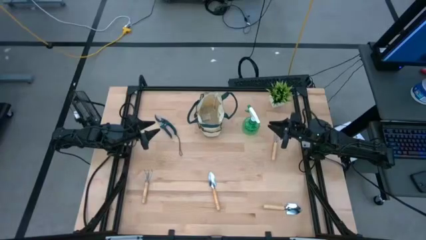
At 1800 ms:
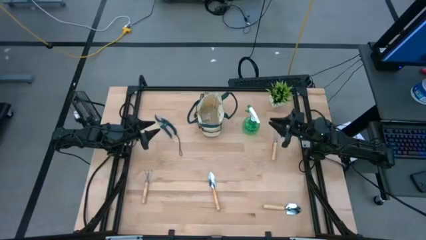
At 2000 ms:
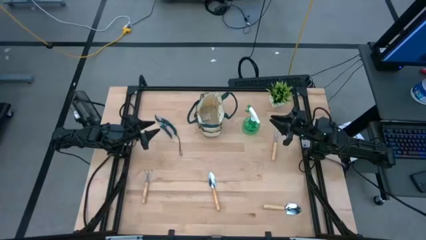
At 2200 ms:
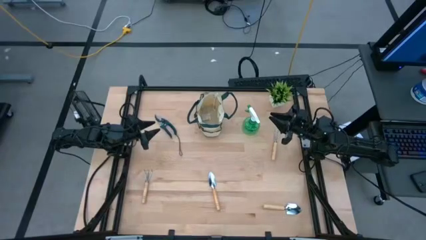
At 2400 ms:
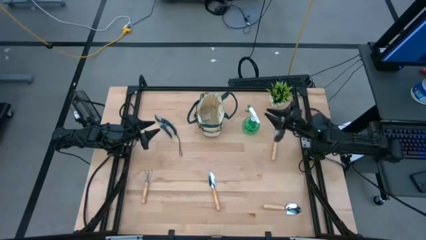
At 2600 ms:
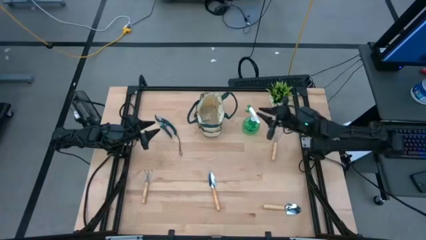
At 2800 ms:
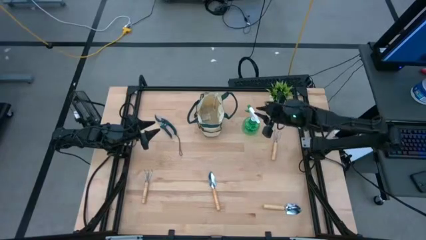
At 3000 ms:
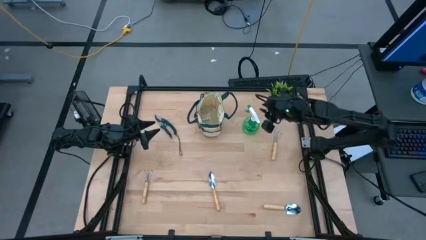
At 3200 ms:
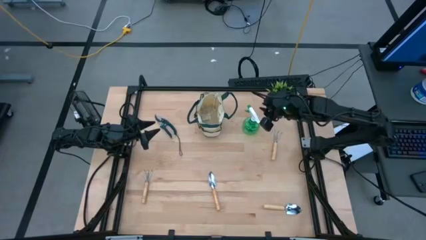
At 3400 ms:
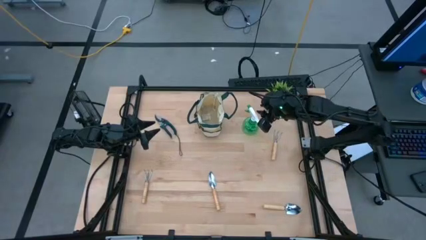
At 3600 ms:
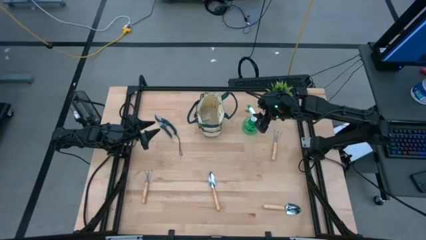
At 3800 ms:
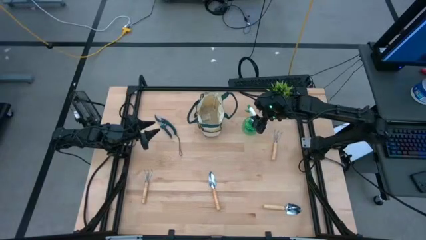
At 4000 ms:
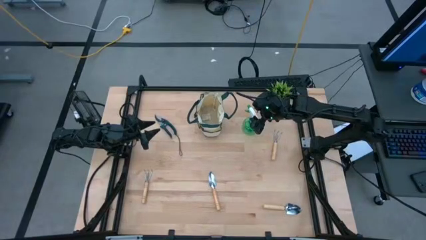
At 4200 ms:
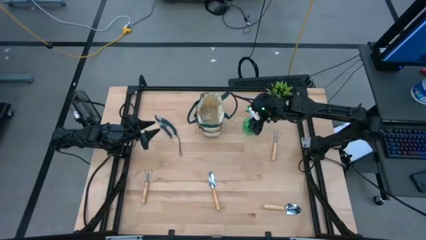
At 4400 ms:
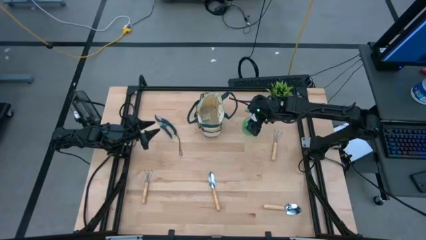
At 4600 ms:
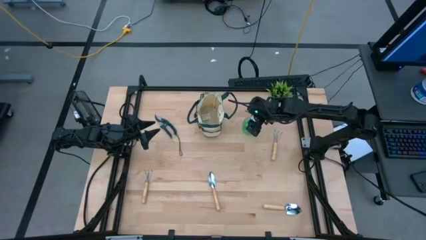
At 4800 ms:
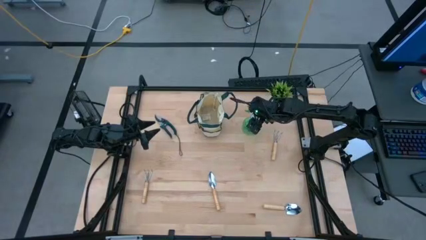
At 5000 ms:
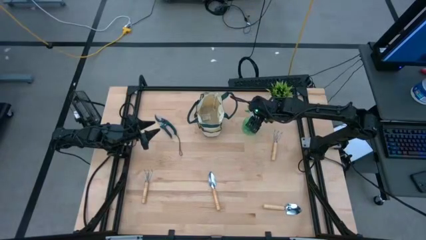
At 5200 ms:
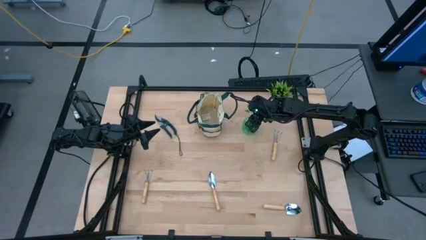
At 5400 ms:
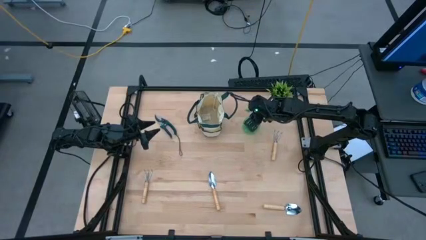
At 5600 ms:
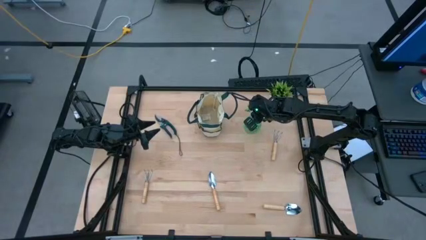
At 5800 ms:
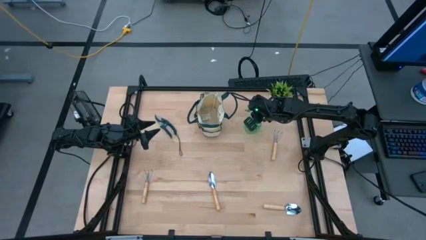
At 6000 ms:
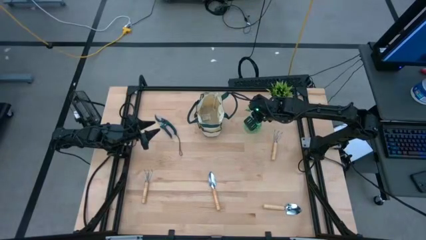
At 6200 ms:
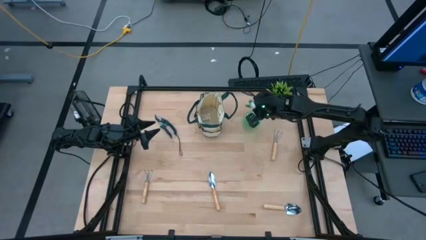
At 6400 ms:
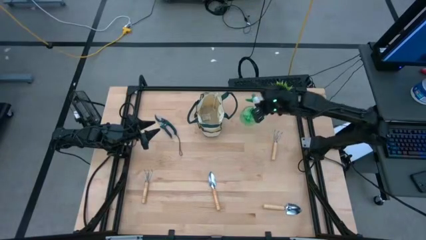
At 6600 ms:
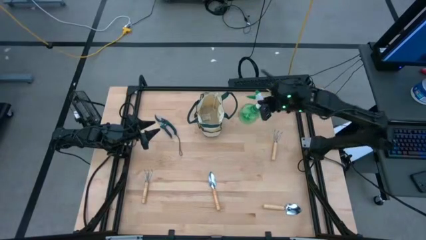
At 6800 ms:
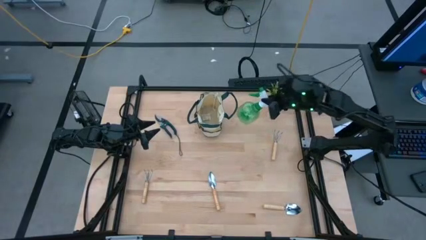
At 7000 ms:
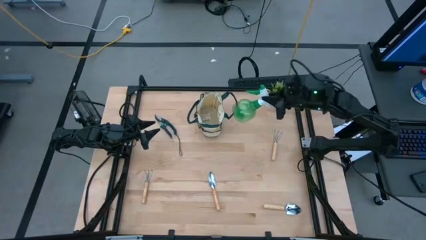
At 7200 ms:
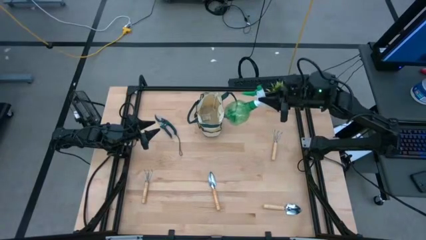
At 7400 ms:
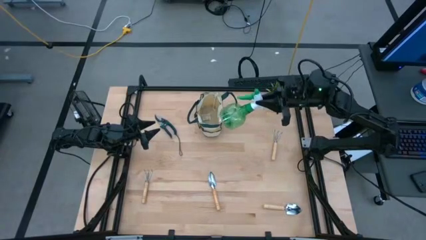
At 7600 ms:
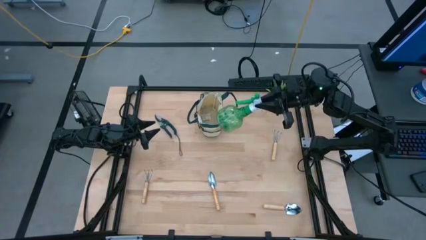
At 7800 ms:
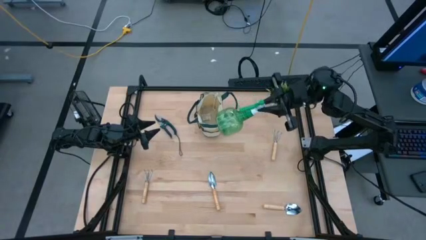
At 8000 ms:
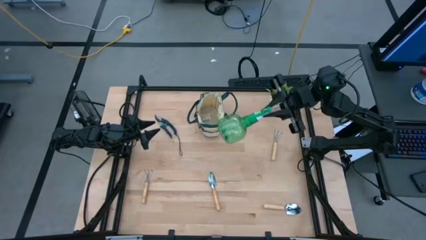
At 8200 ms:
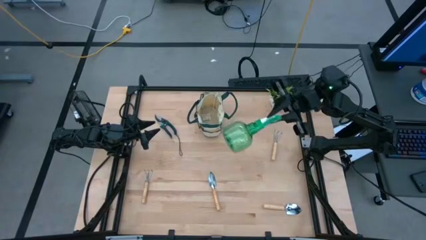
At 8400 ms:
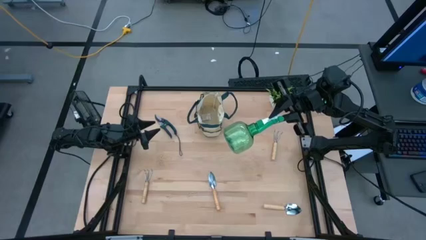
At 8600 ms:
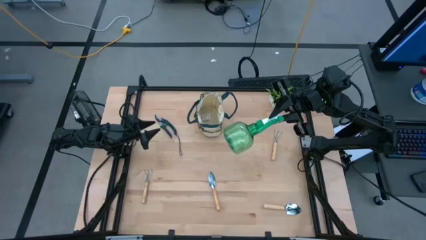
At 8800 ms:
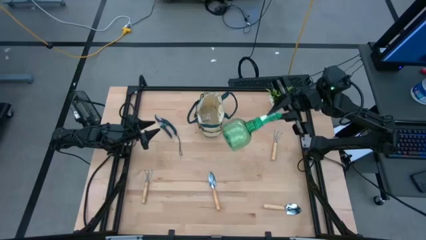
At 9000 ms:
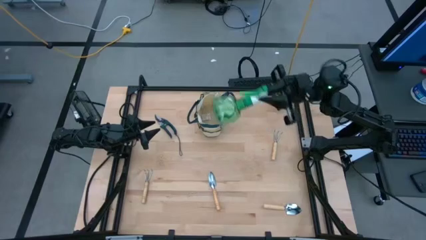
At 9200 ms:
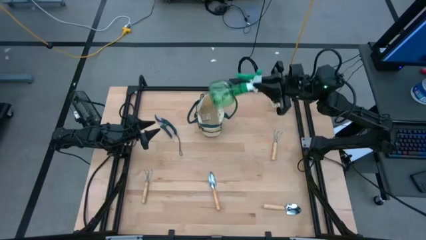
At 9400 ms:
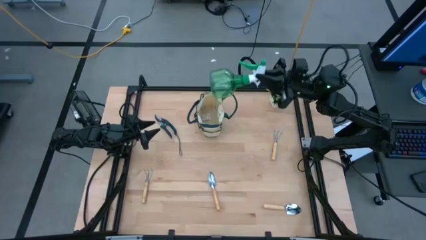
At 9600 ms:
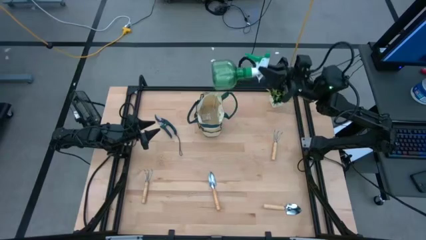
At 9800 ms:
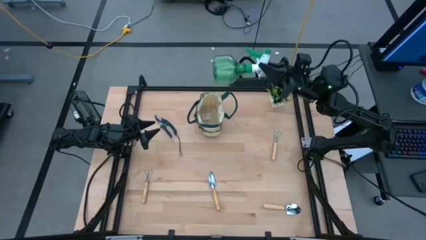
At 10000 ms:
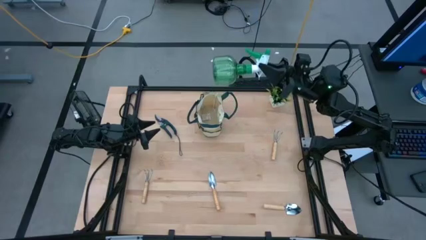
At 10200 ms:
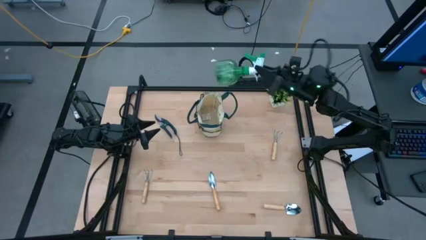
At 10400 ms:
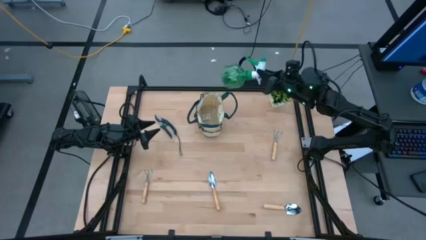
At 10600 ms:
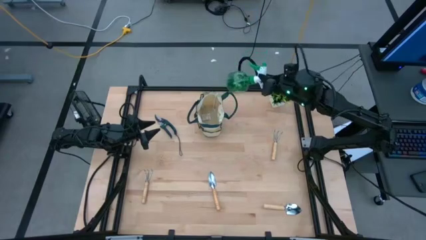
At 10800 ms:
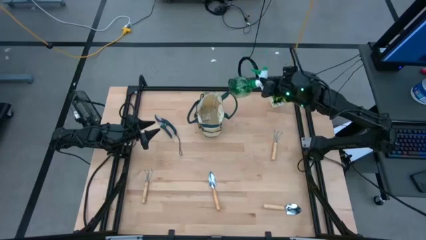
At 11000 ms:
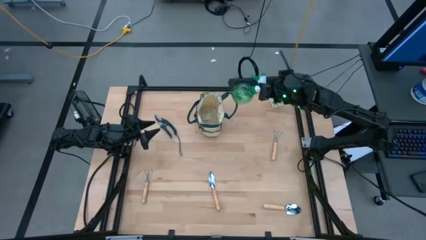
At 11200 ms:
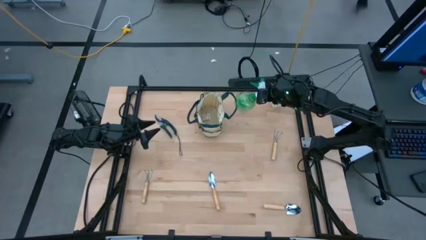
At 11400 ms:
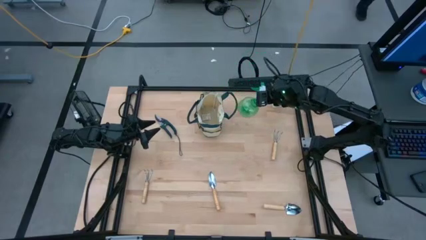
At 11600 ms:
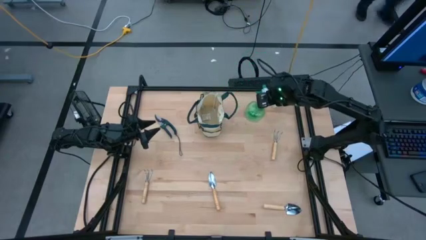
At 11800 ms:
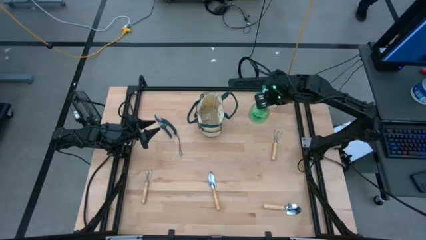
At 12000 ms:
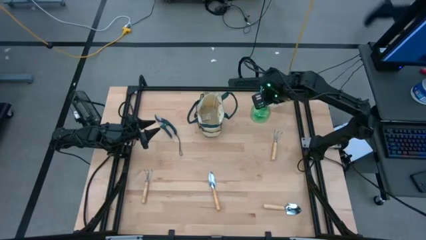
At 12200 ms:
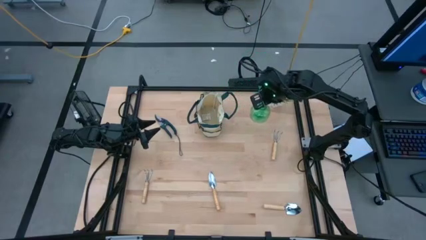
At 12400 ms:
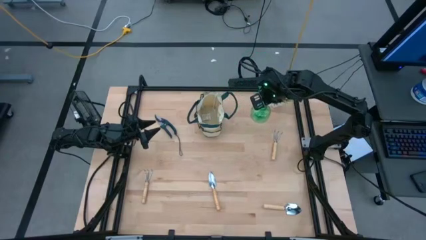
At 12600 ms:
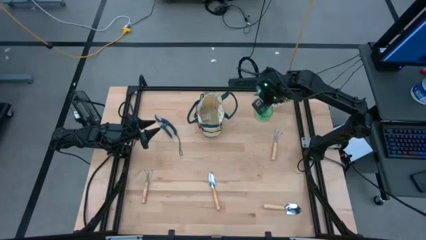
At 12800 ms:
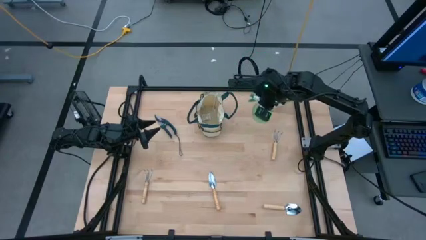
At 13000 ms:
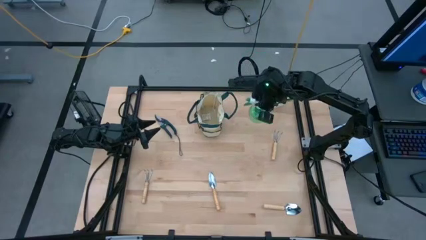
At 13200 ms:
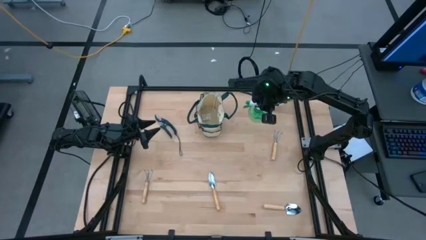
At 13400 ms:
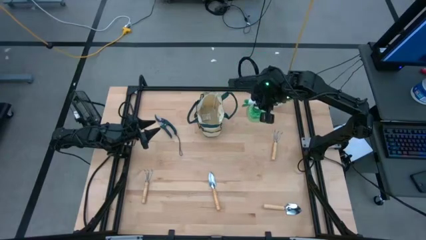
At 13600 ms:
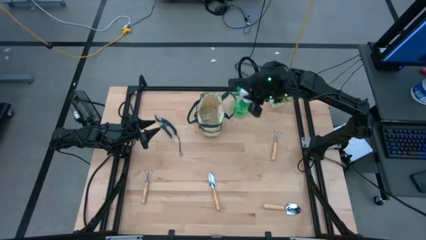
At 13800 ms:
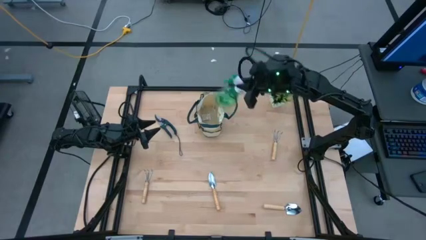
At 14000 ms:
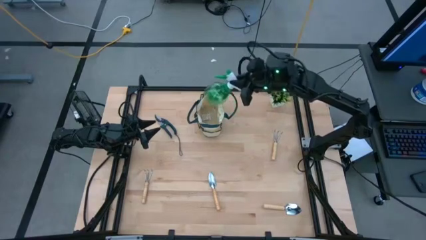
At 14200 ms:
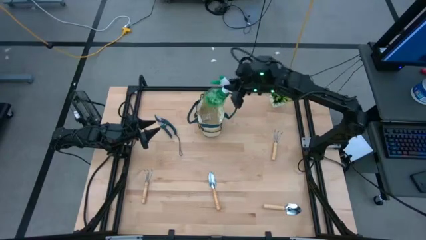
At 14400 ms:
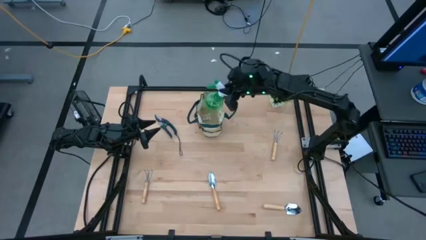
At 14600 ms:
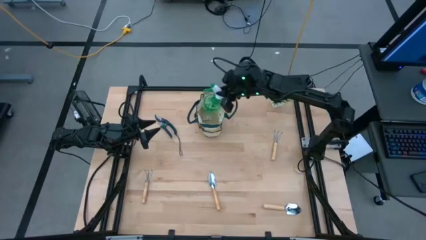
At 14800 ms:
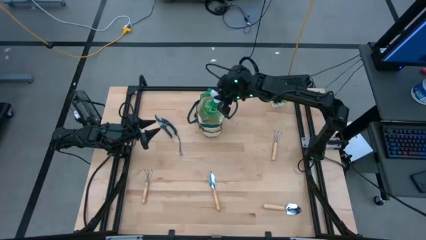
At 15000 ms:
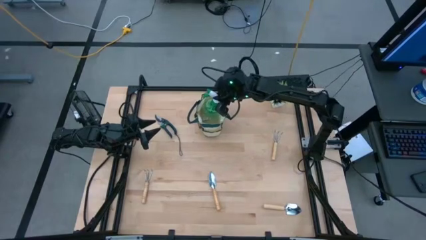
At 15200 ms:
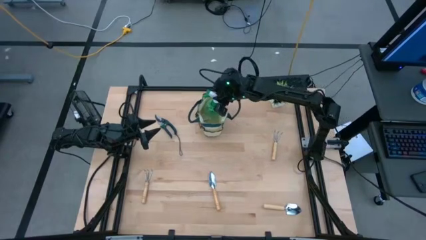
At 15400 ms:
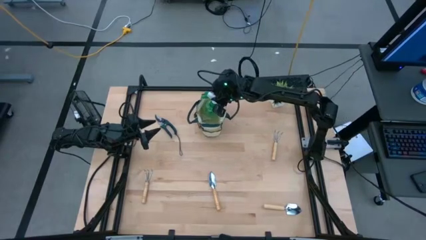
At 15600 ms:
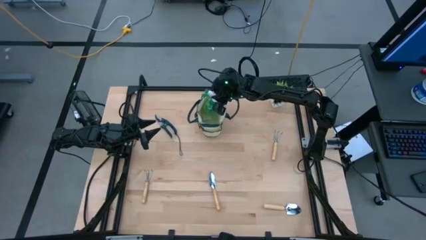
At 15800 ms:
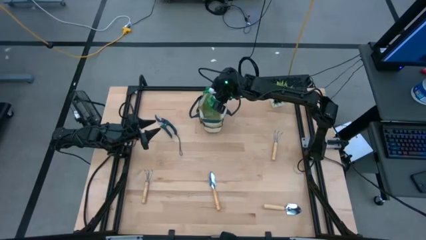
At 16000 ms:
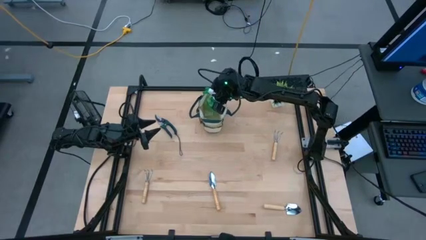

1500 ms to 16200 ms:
Task: Pick & Place Garden tools in Gardening bag
Put the green spray bottle into the gardening bag
